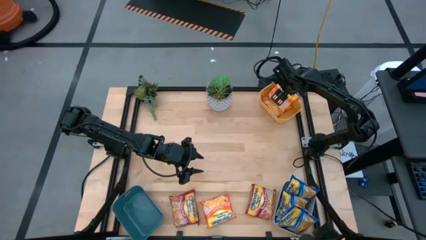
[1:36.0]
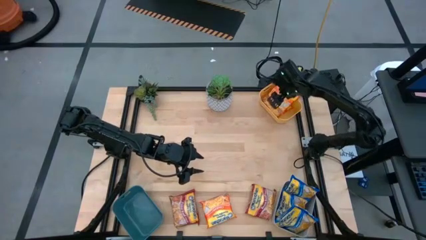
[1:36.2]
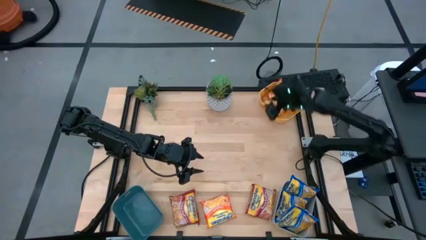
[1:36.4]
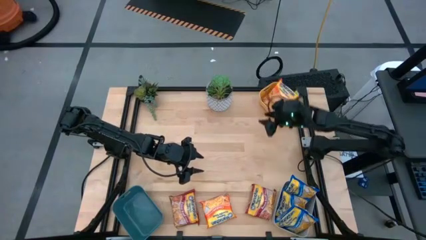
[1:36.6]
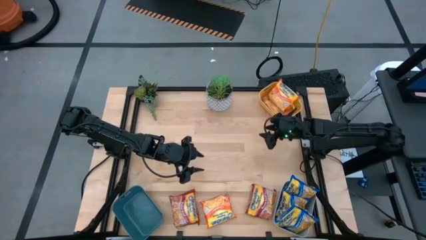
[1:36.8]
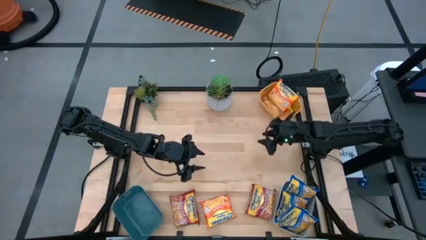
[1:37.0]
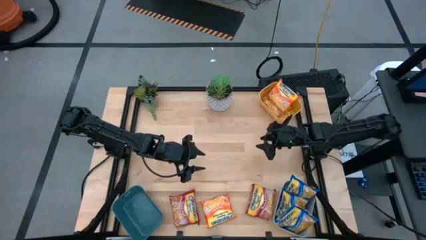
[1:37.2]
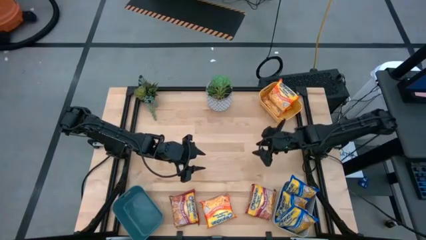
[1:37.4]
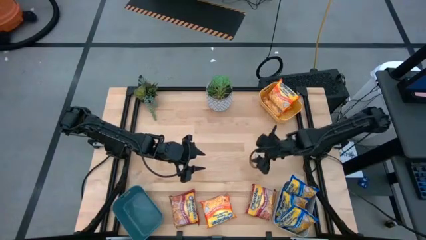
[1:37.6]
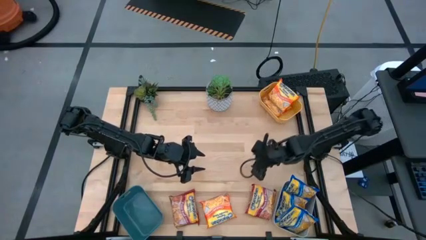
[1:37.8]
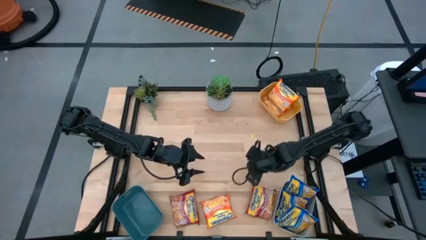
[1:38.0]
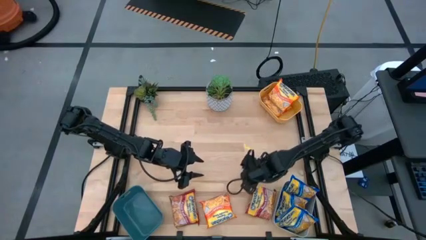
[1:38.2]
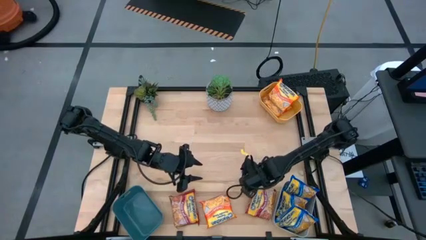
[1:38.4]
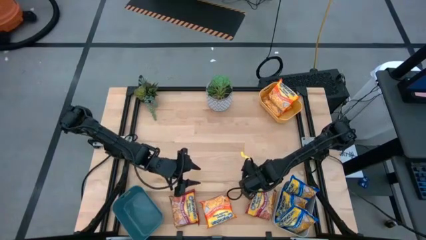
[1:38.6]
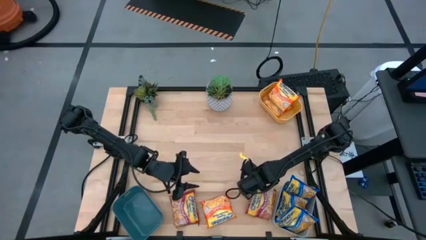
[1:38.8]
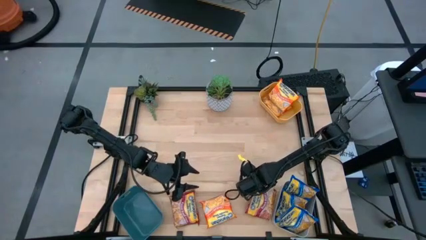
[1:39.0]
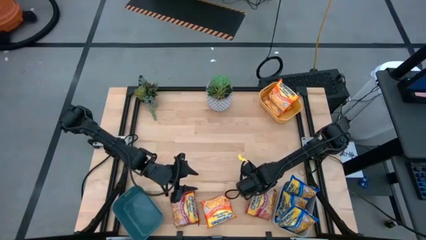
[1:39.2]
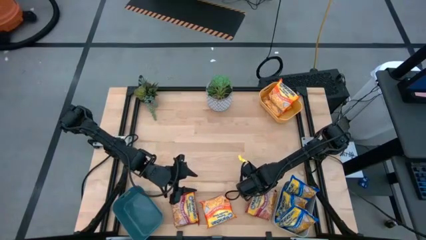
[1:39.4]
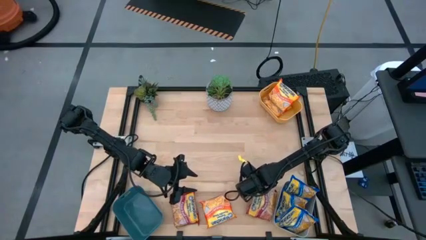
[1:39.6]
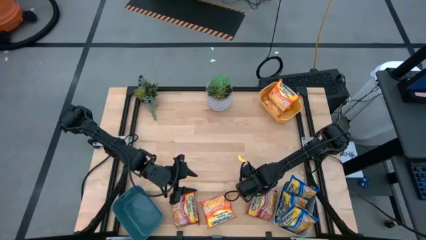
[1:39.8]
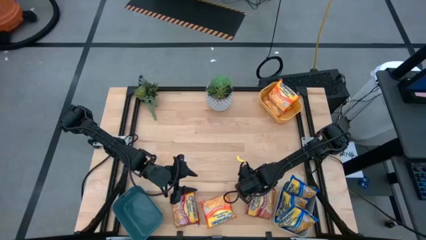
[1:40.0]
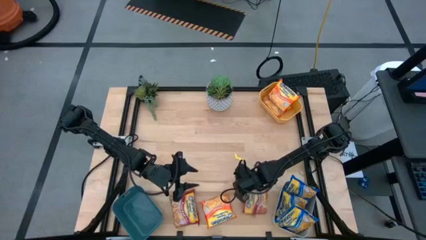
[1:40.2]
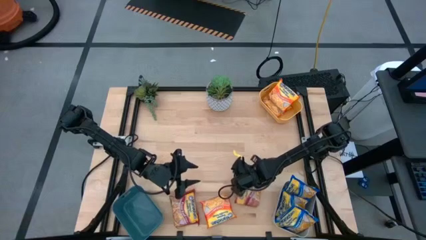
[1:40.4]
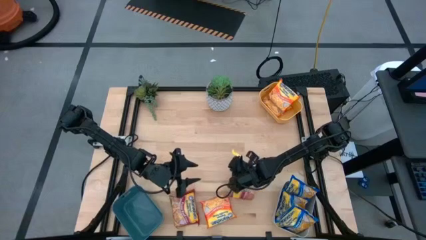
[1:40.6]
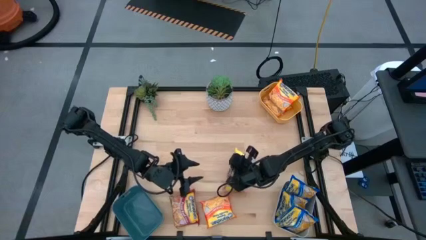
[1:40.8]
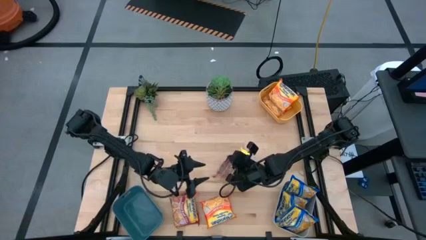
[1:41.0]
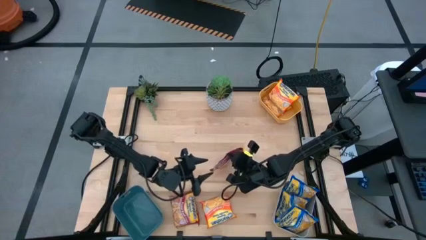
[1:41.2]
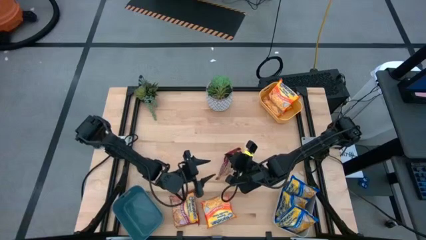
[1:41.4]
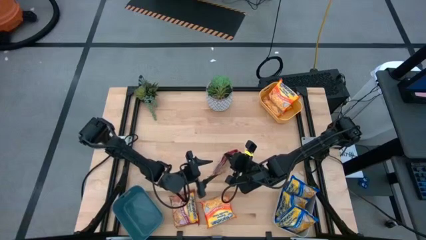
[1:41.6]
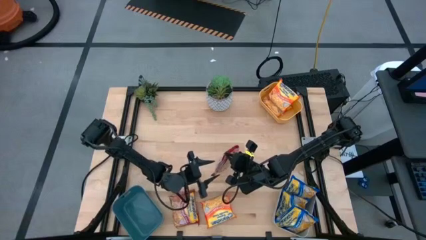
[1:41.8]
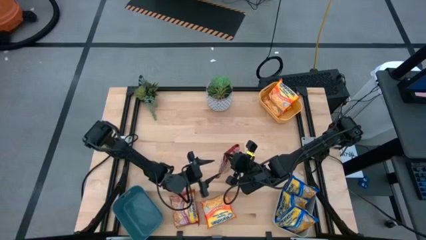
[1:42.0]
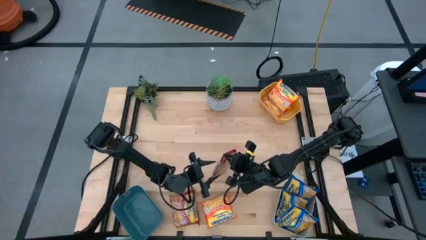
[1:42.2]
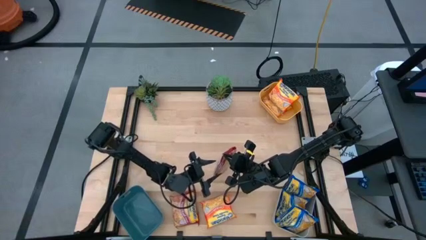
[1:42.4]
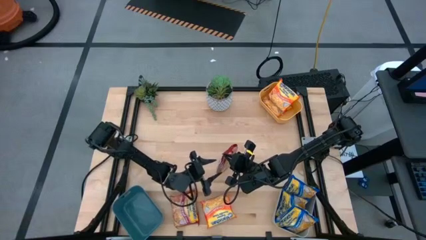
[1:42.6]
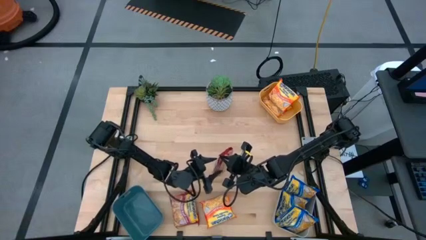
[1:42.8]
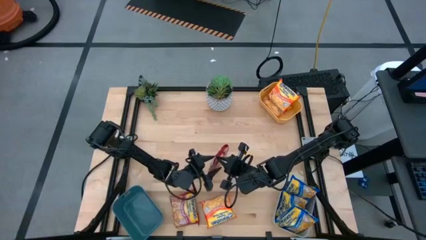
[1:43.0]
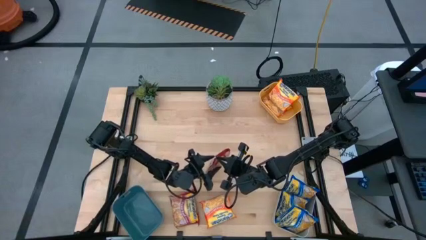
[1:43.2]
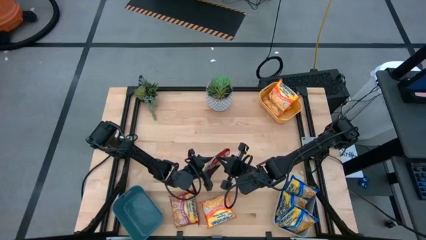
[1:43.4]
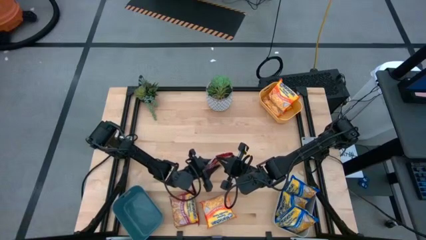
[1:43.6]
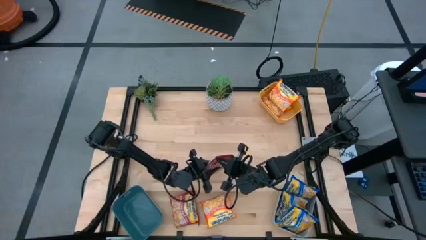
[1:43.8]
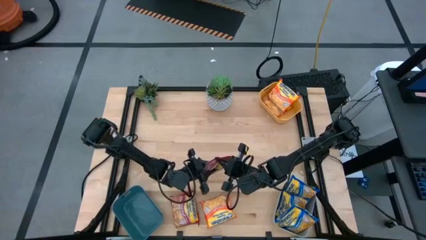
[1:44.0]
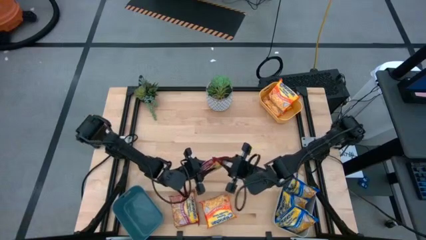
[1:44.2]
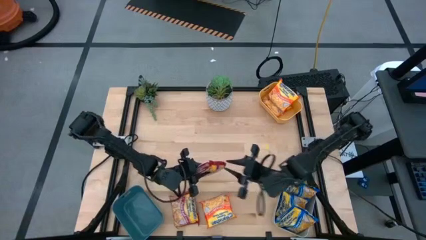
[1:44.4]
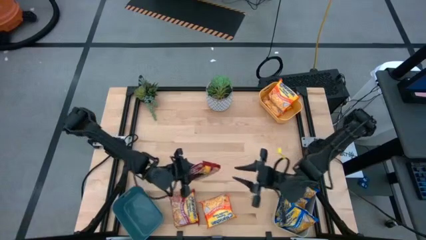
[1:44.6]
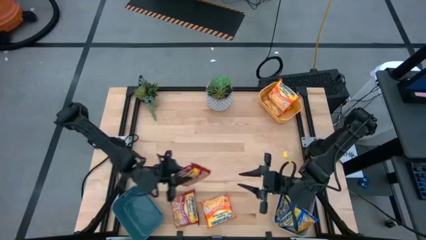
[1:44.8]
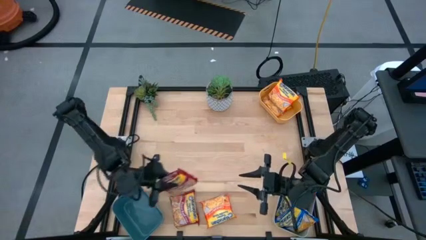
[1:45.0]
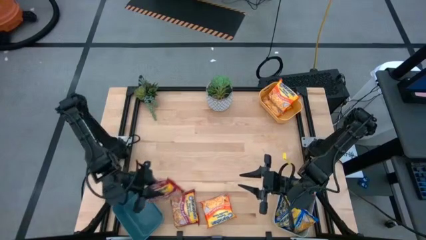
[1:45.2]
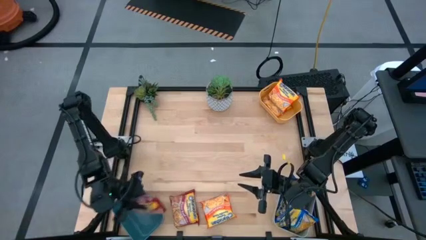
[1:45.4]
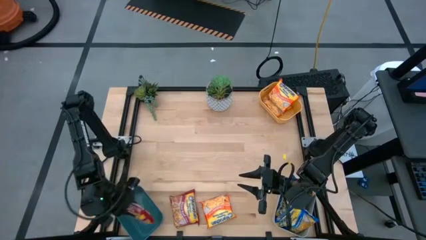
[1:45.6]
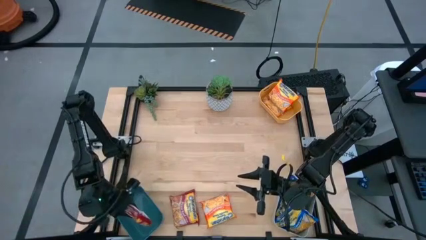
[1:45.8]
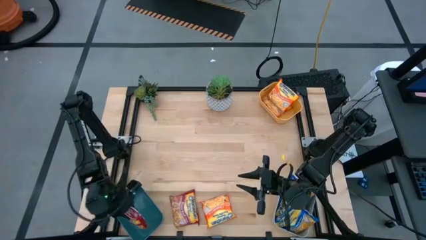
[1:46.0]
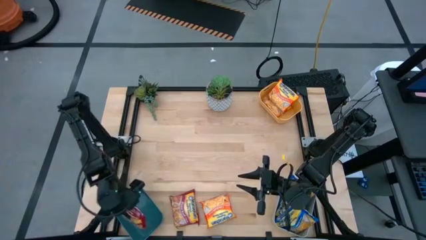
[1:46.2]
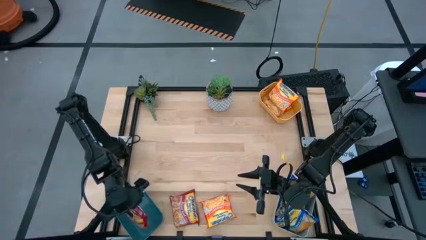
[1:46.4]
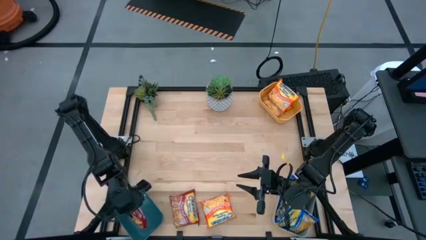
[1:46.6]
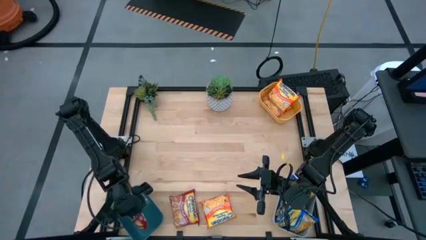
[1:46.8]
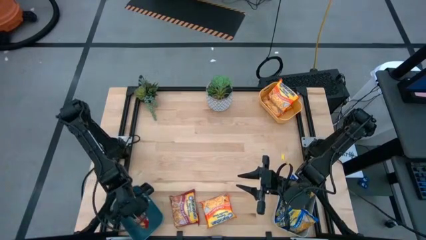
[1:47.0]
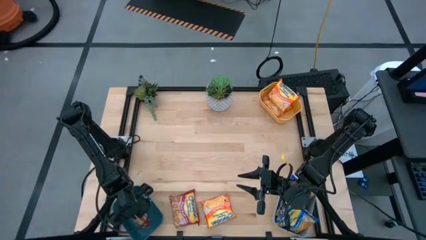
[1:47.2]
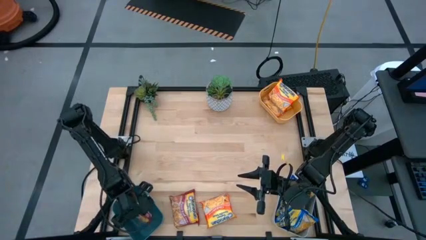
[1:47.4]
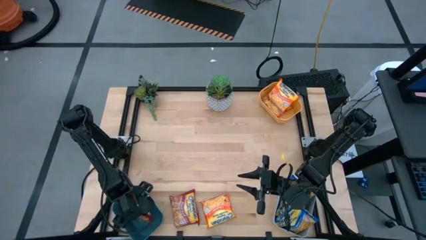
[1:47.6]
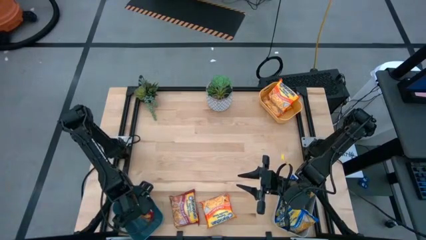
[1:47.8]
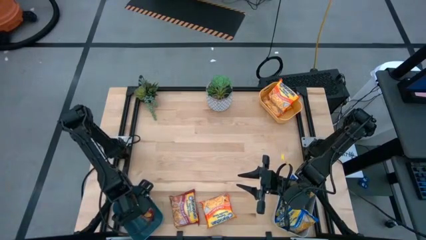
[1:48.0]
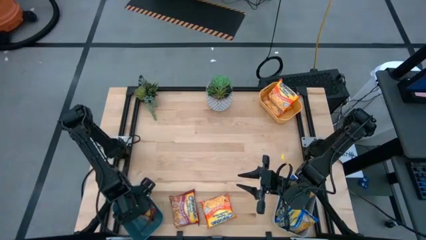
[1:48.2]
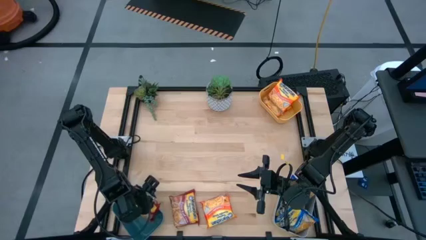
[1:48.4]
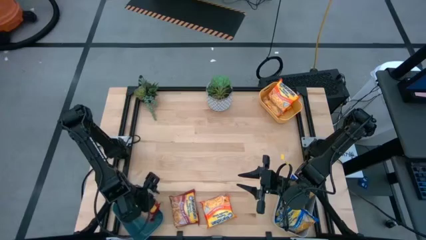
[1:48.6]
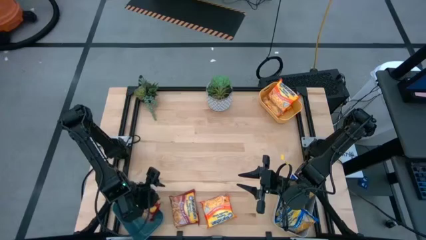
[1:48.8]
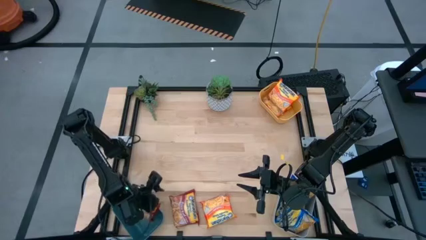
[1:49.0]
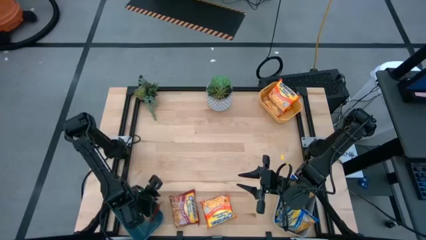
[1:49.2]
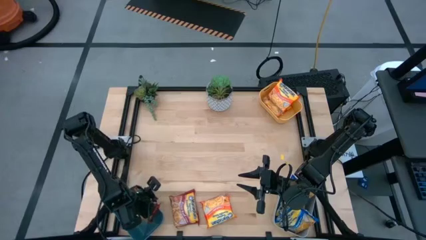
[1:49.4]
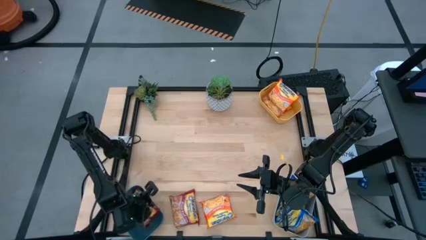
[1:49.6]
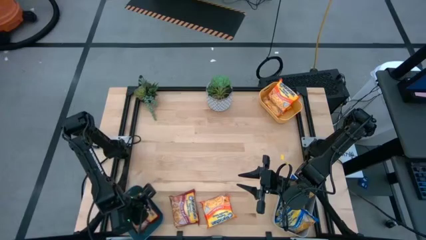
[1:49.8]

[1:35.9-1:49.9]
Task: Sort Maruchan noodles
Put the right red noodle pack into the blue bin

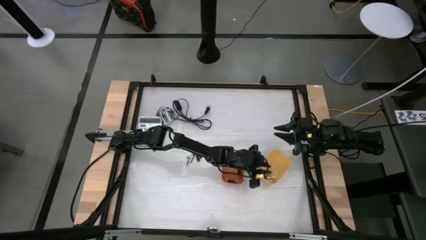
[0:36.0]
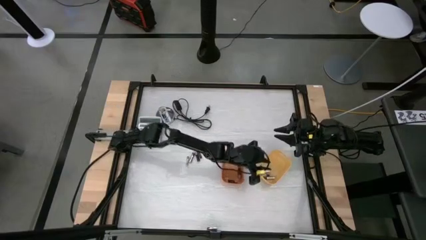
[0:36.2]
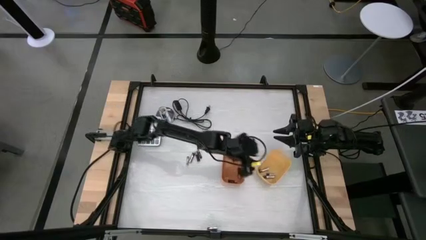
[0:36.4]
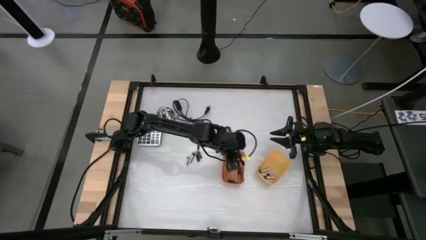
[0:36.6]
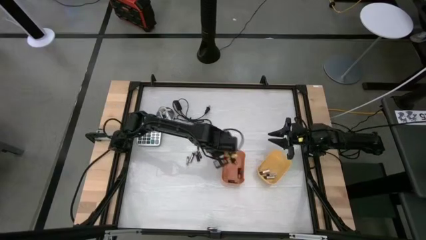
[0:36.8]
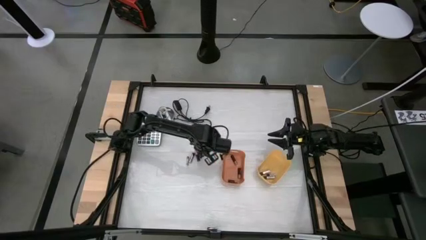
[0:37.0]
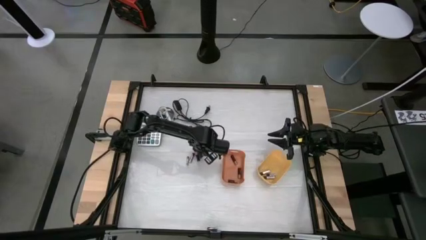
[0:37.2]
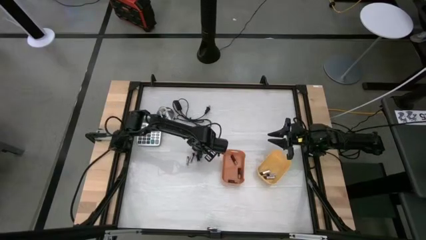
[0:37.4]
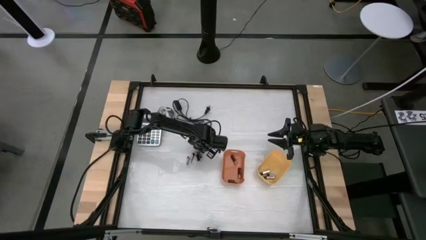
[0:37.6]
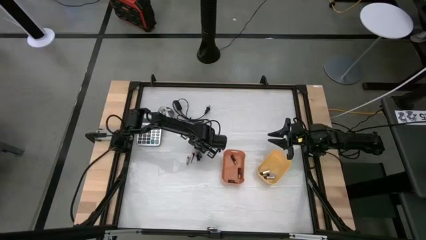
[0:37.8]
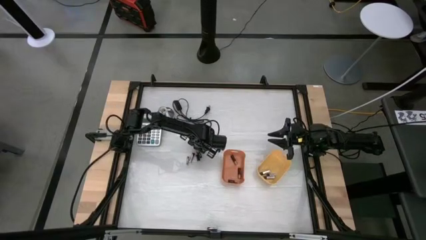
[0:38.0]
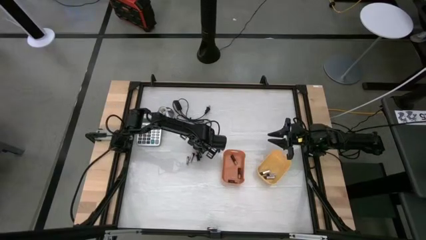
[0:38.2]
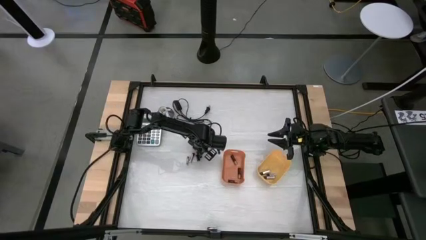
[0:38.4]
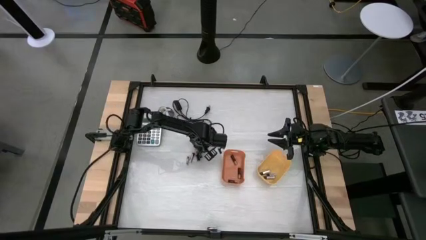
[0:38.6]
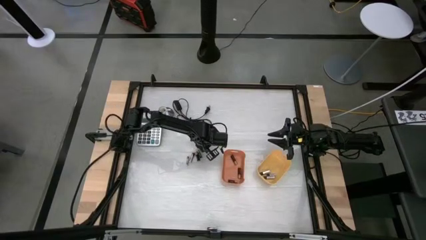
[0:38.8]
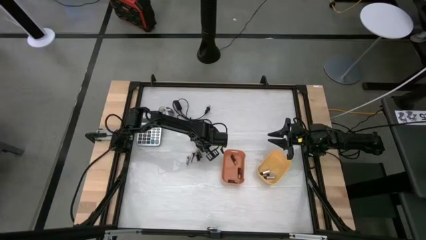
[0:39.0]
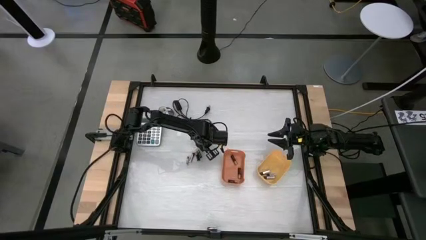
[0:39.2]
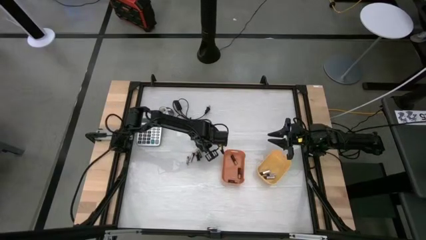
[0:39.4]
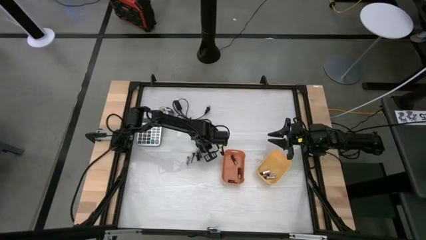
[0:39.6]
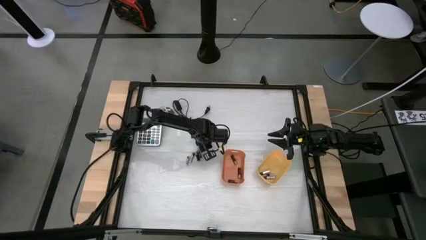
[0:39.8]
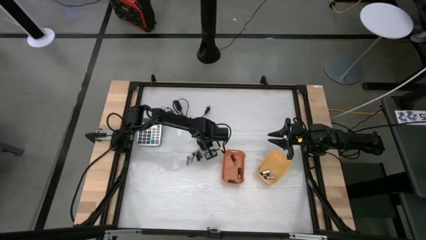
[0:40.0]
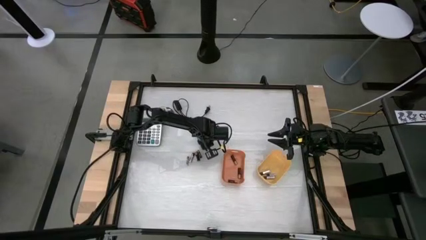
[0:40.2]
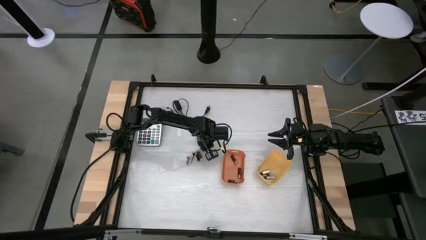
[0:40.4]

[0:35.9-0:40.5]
Task: Sort batteries
Put the black battery into the orange bin
